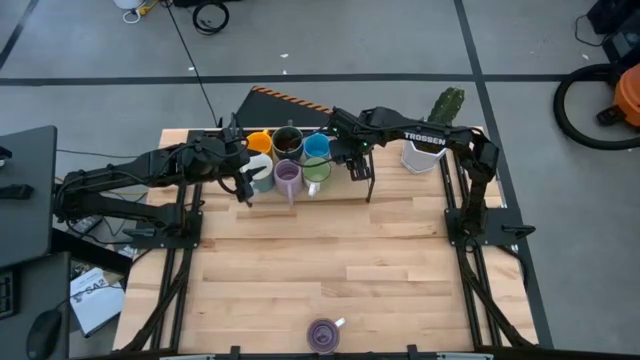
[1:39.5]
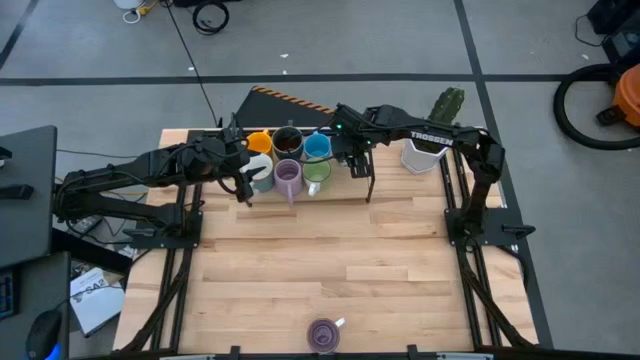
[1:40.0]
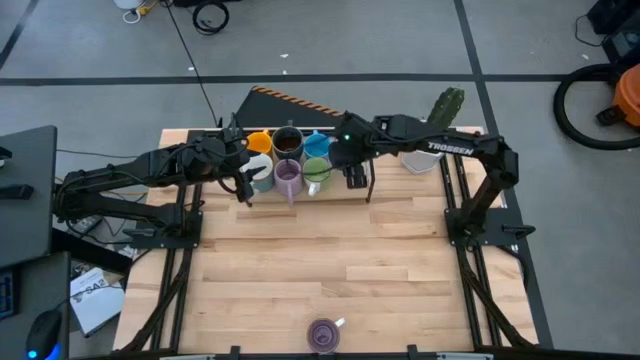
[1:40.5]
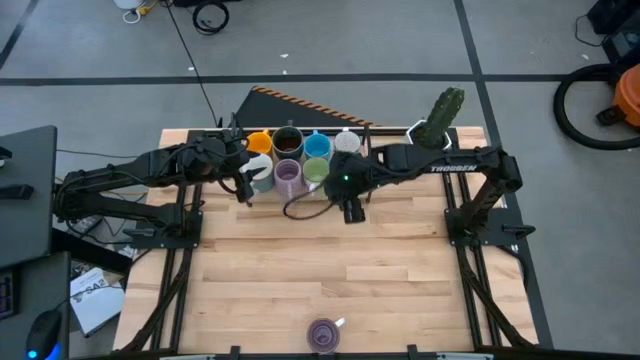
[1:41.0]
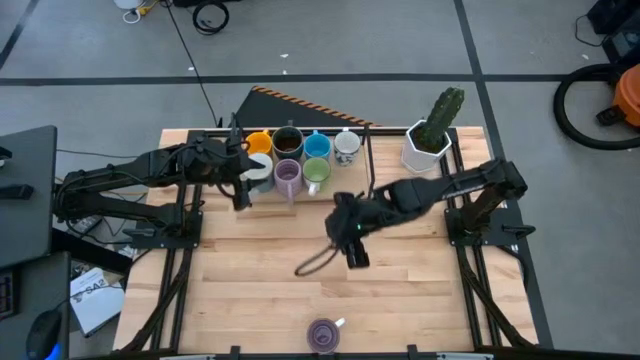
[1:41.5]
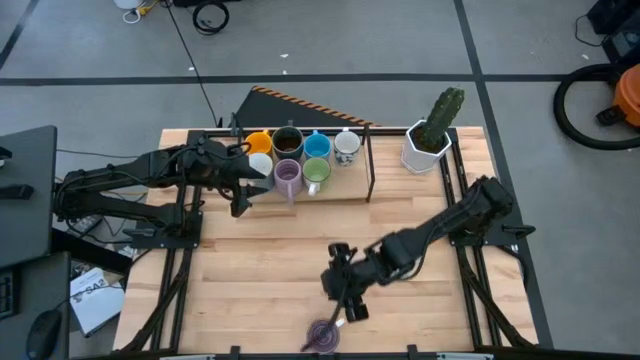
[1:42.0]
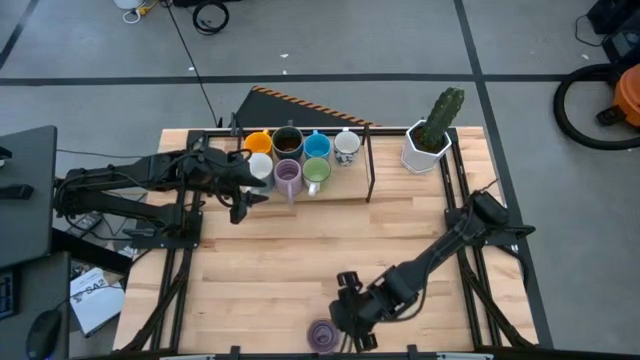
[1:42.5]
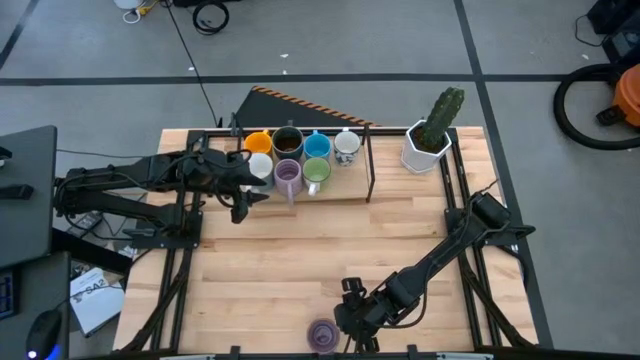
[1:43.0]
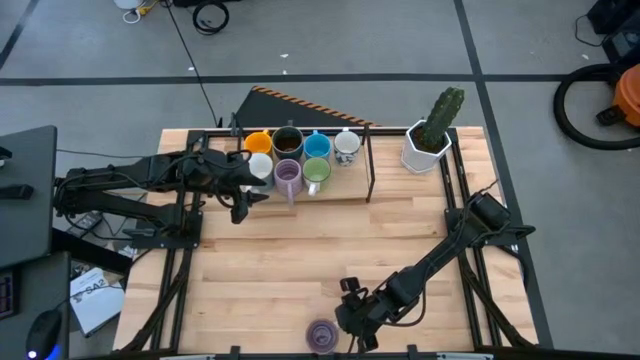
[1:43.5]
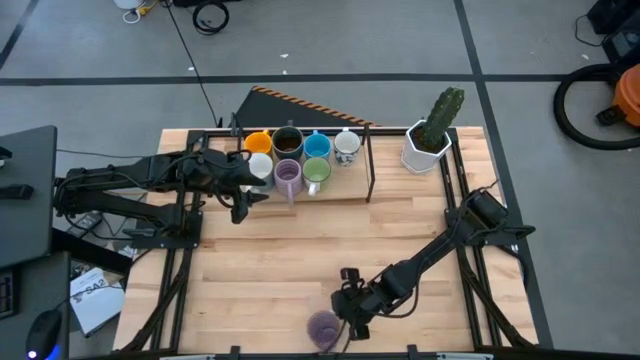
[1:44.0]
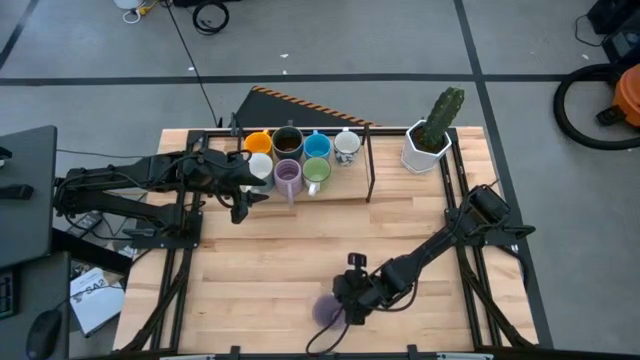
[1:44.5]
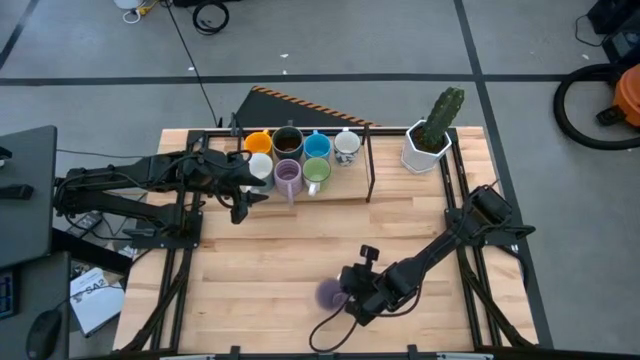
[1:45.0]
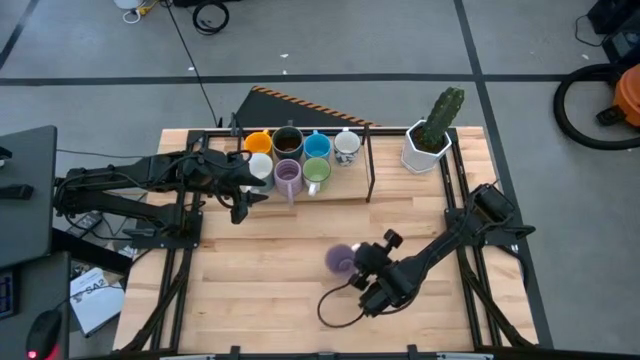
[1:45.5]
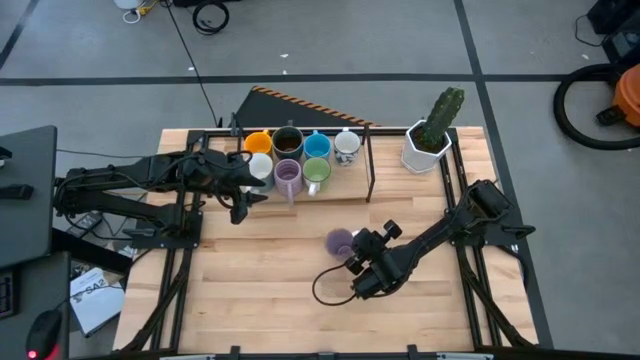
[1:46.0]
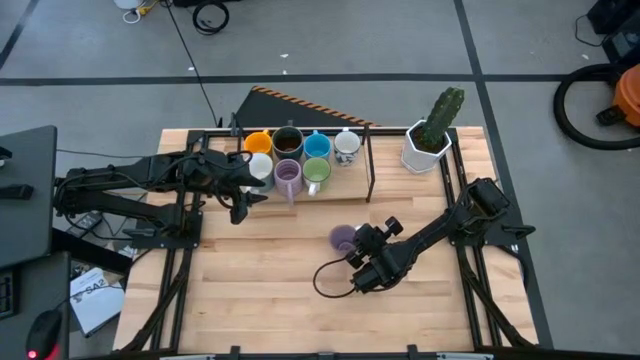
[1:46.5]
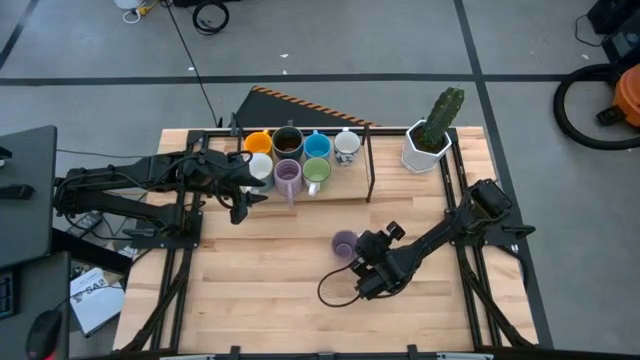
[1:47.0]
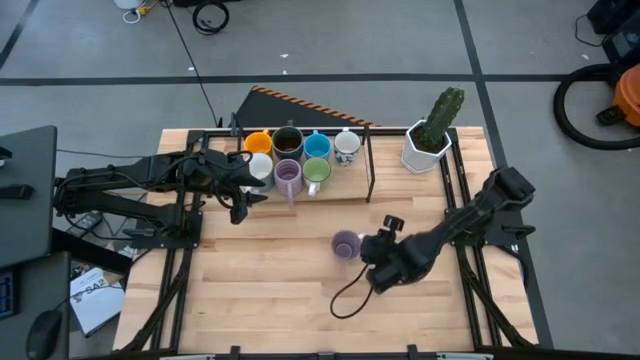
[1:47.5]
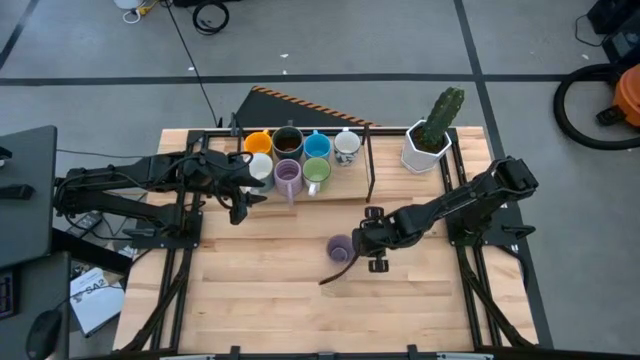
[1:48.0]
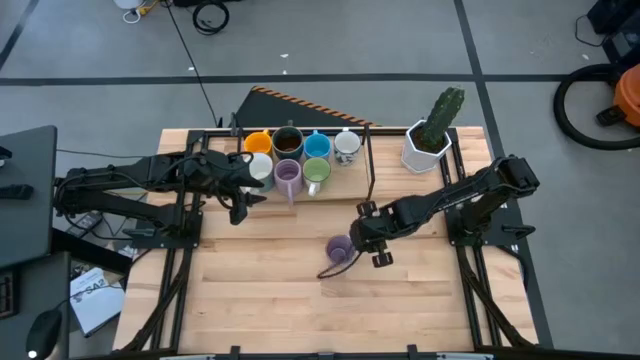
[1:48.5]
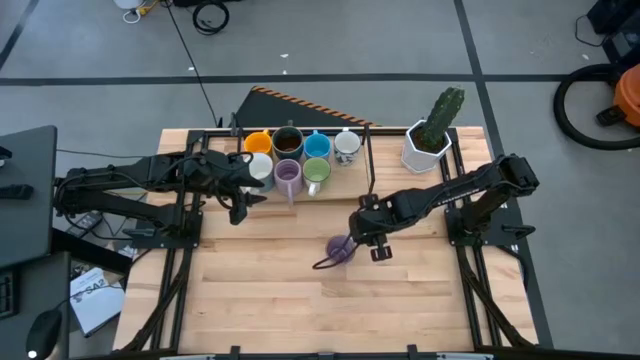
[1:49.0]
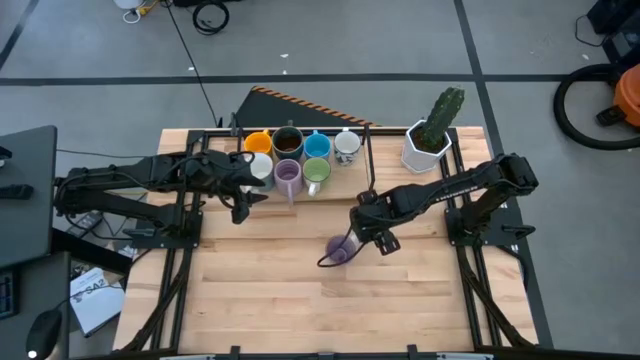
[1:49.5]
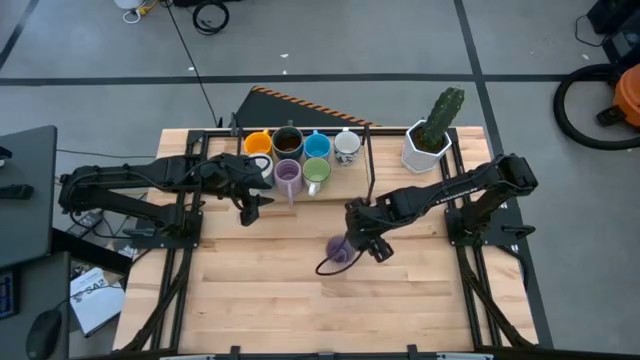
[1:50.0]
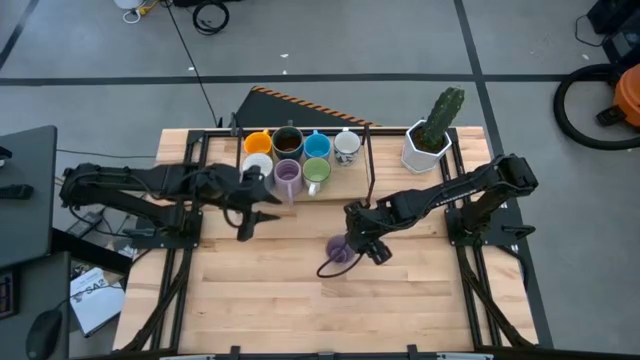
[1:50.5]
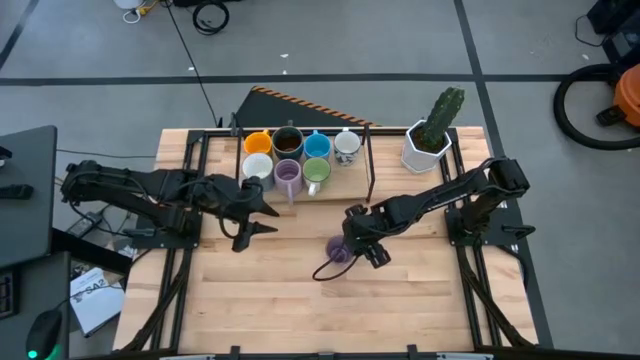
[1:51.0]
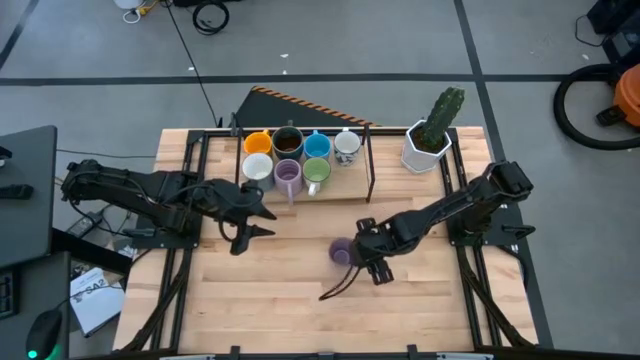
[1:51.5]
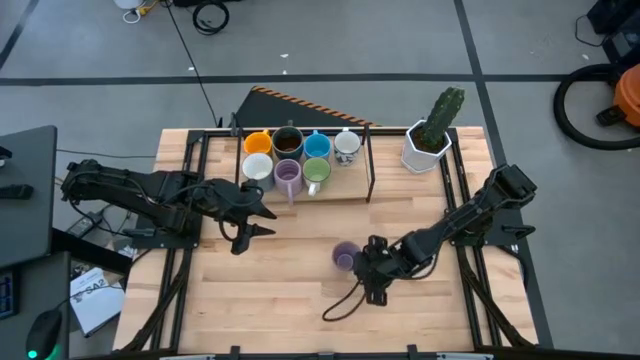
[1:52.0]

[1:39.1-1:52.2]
Task: Place coffee mugs
Put the purple and white mug on the shelf

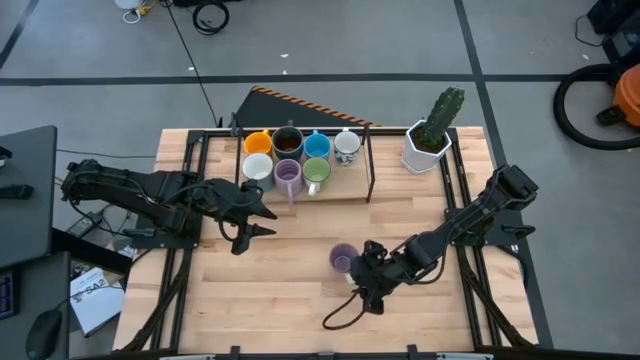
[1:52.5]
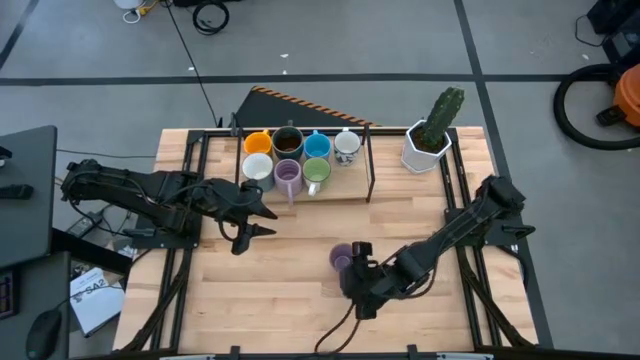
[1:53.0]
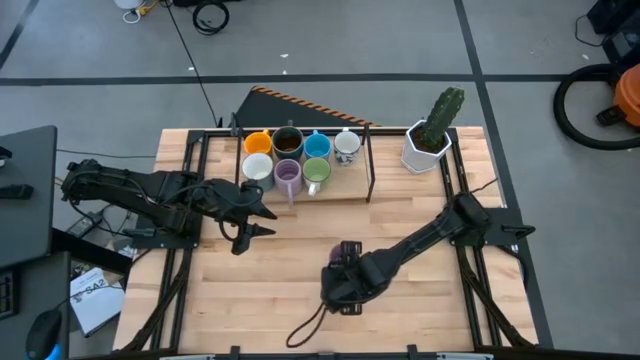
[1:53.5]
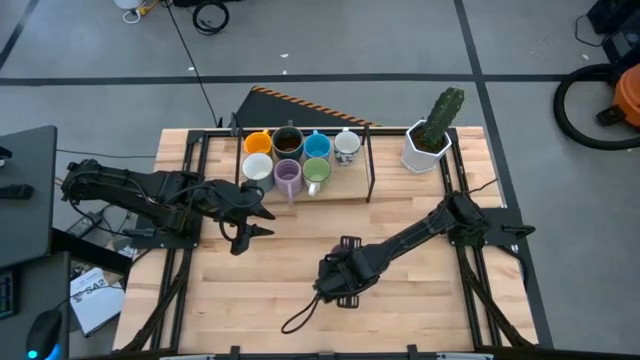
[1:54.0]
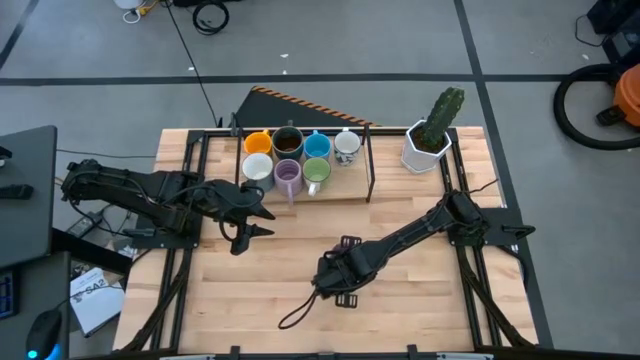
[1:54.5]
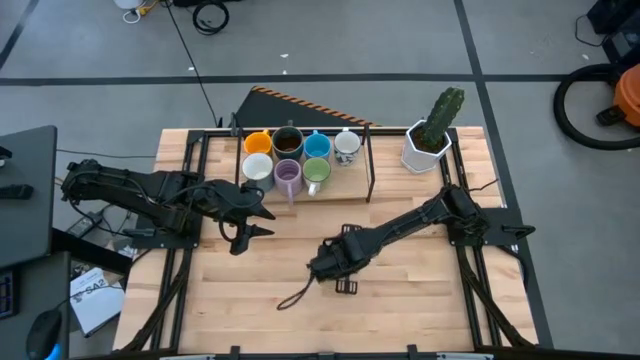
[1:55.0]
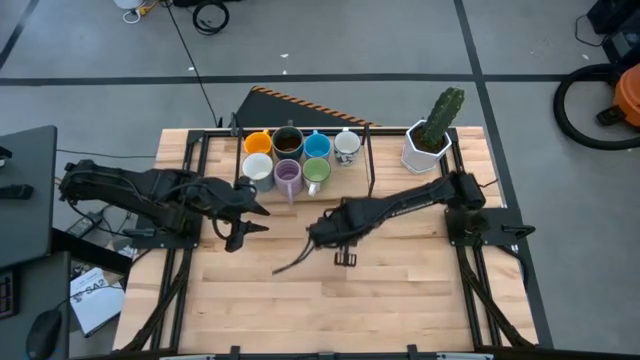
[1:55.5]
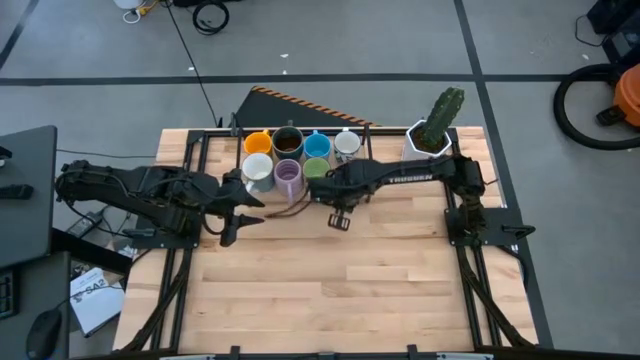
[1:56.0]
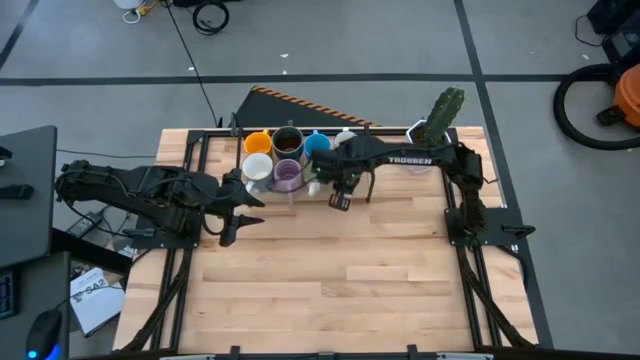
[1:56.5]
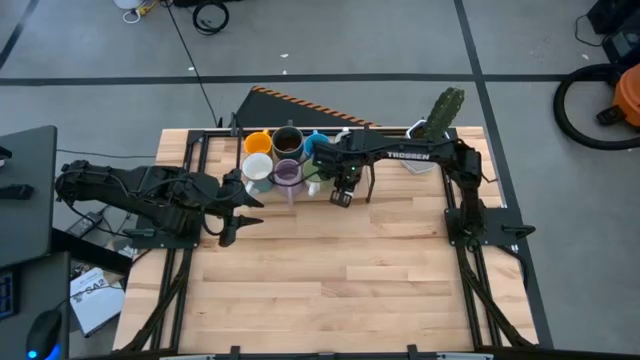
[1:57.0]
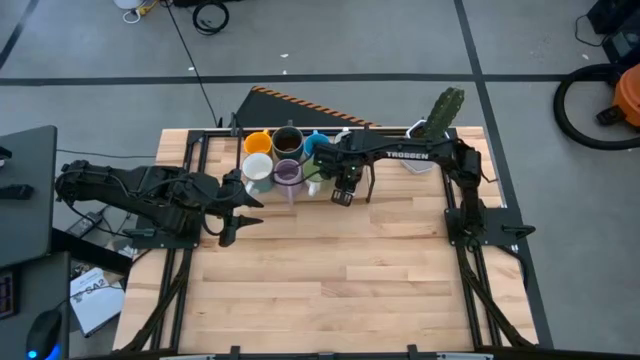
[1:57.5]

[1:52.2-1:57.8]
Put the purple and white mug on the shelf

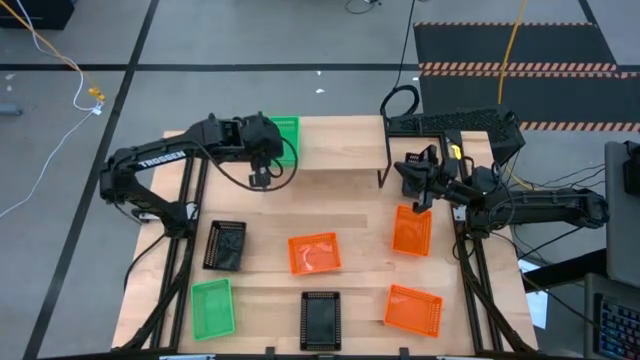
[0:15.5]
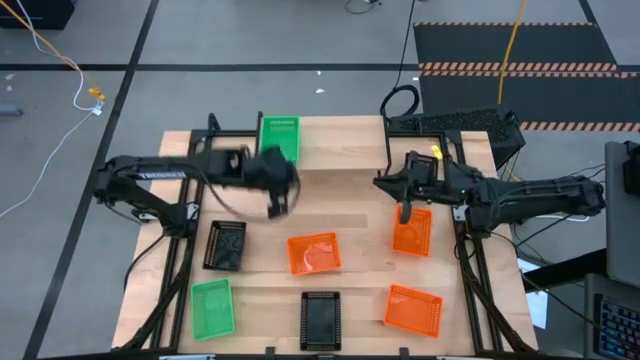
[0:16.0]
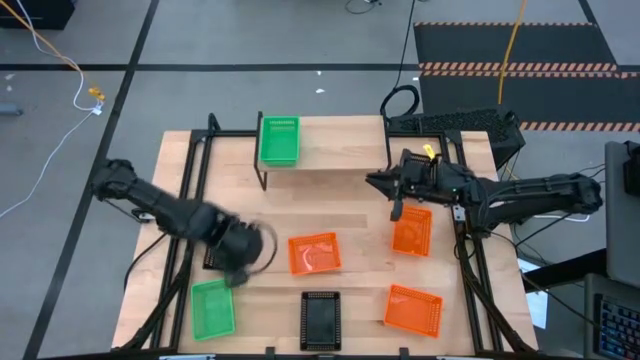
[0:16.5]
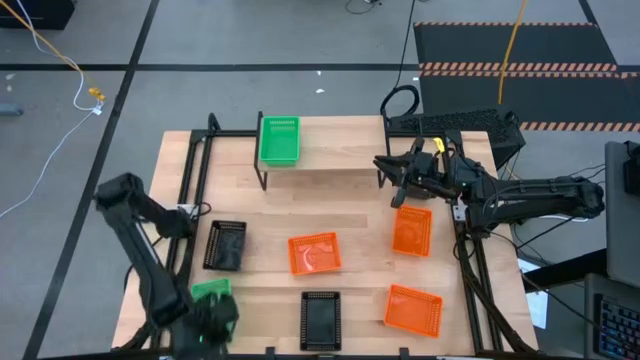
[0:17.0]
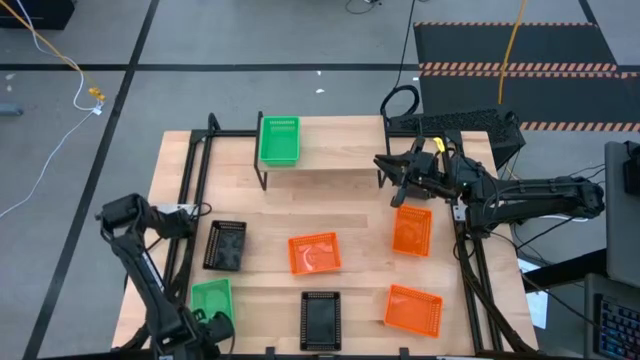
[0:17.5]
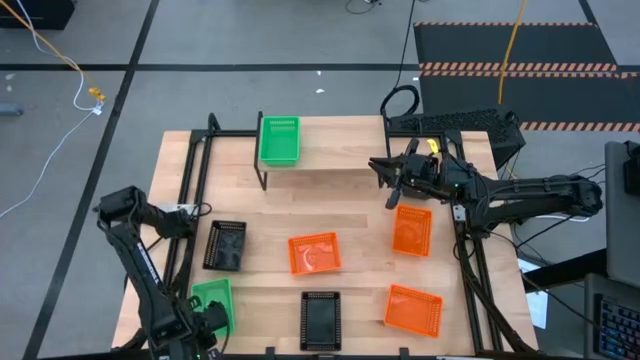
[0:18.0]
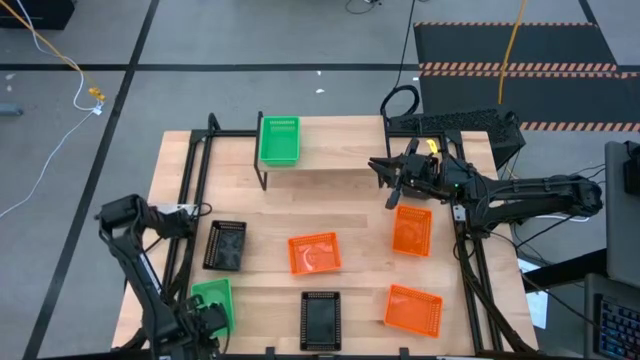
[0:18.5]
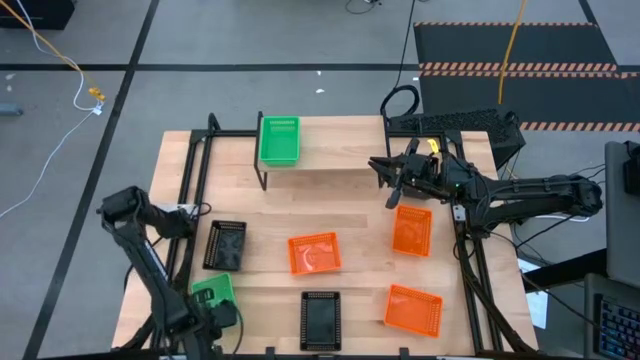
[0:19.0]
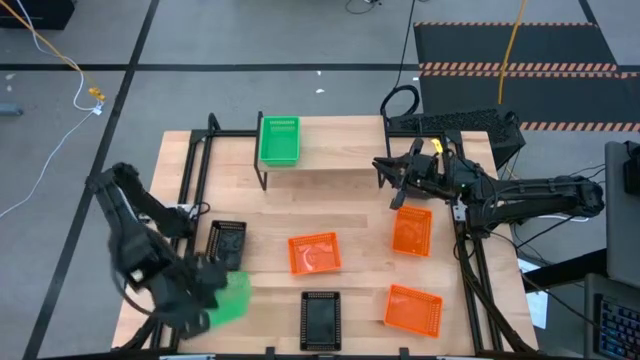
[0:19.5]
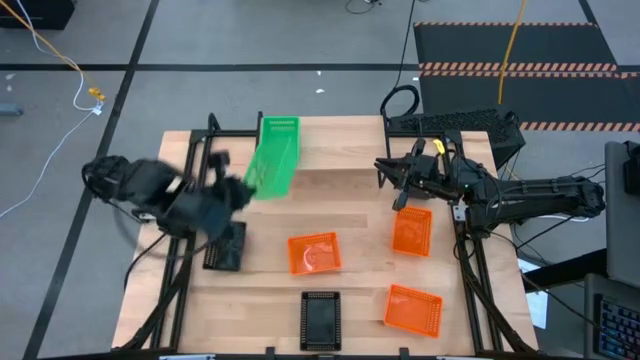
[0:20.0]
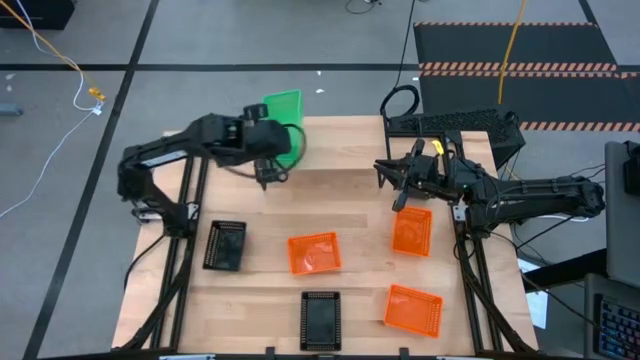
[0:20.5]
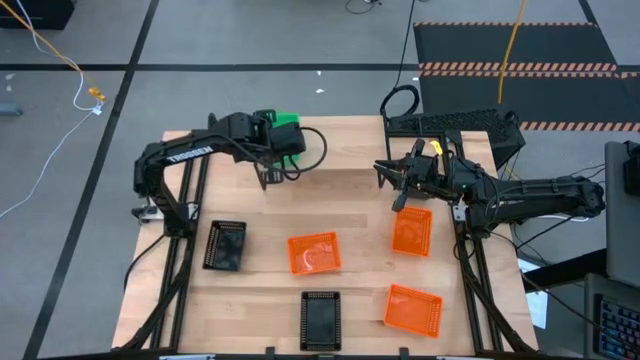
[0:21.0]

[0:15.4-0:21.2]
Task: Stack baskets on shelf by color
Stack the green bin on top of the green bins on the shelf
